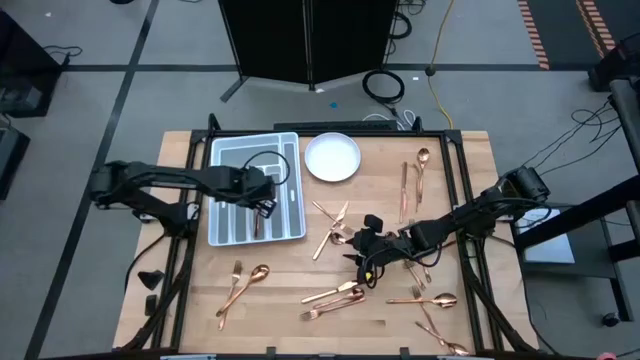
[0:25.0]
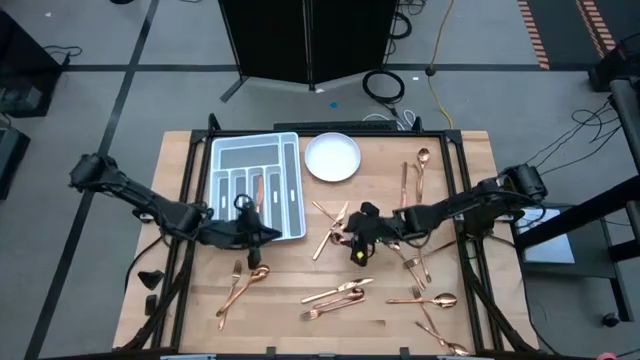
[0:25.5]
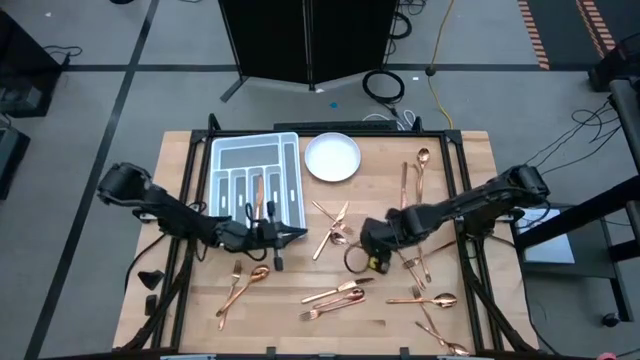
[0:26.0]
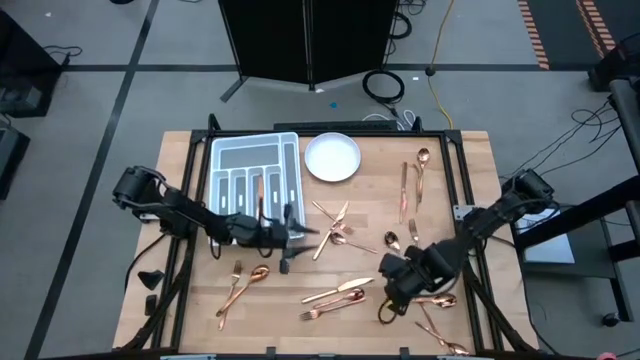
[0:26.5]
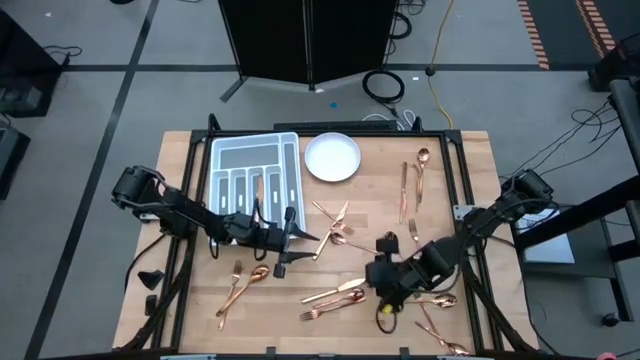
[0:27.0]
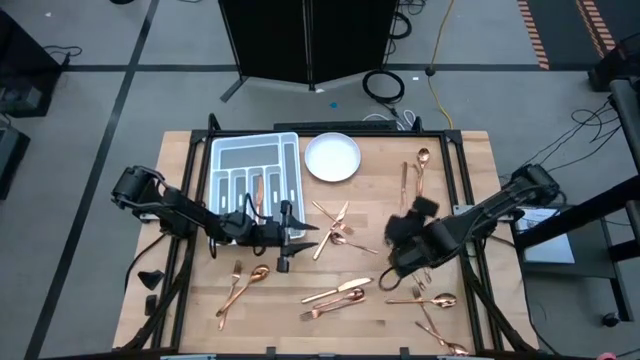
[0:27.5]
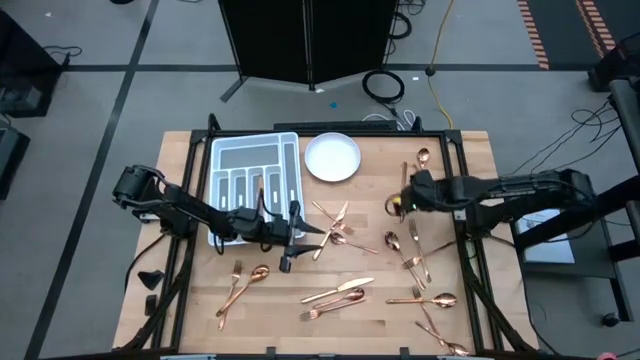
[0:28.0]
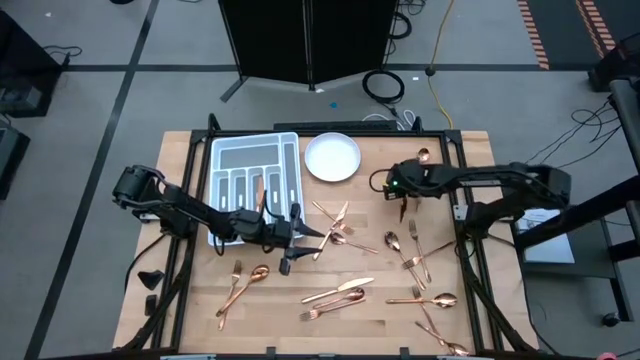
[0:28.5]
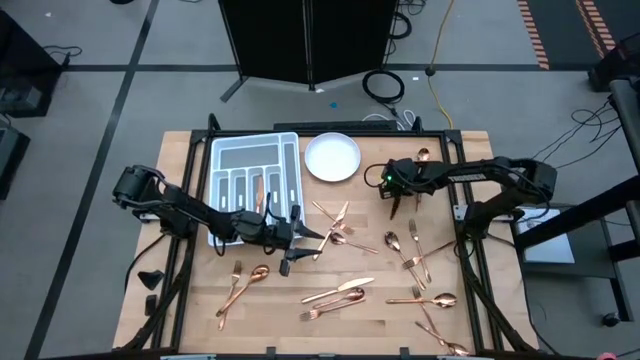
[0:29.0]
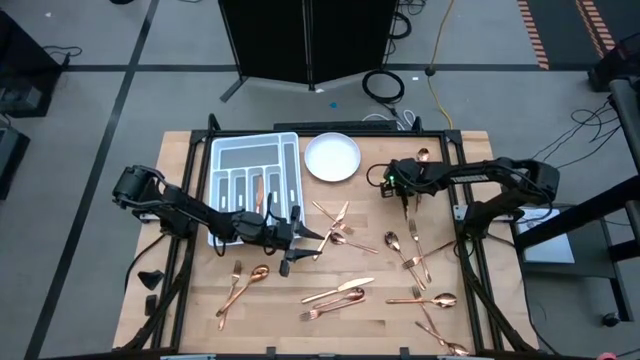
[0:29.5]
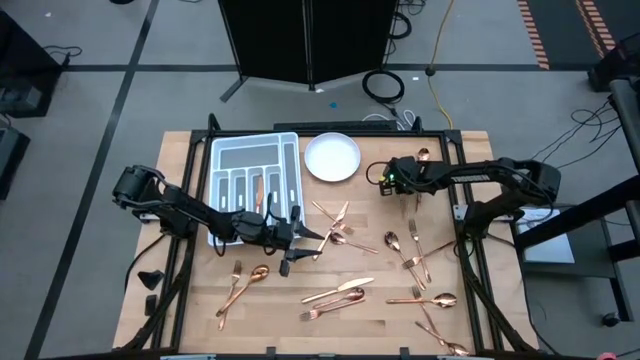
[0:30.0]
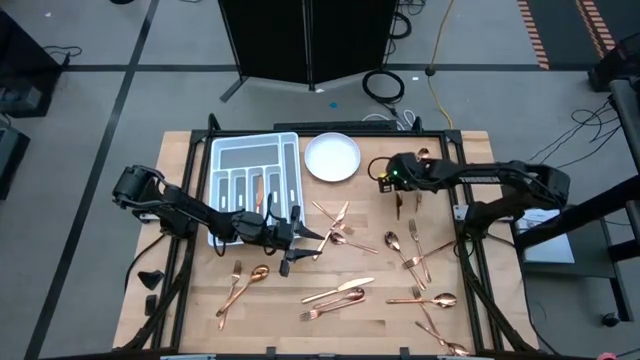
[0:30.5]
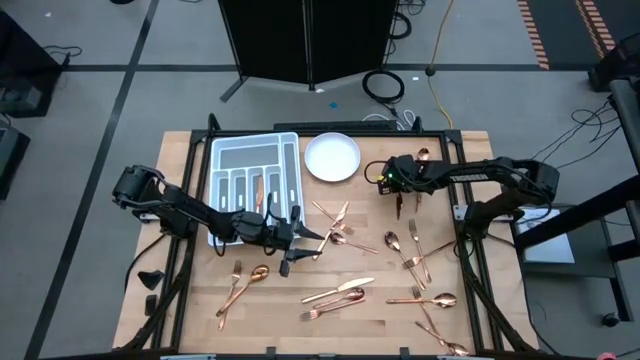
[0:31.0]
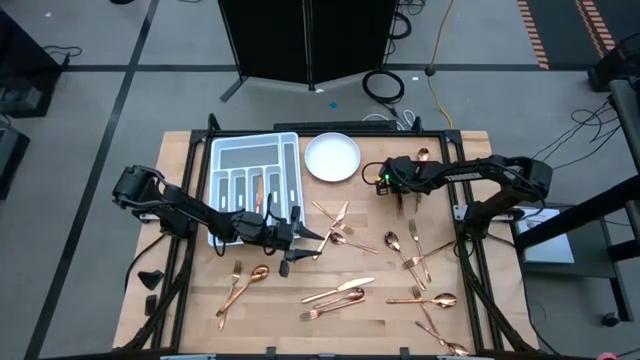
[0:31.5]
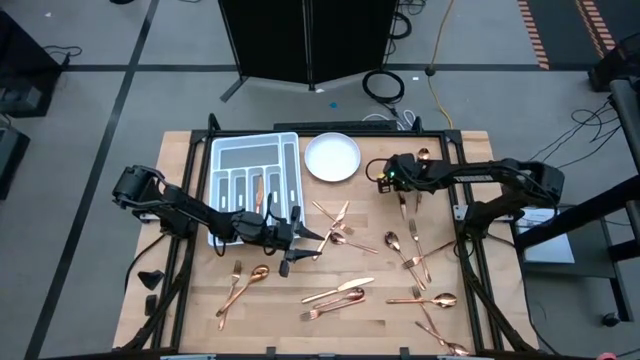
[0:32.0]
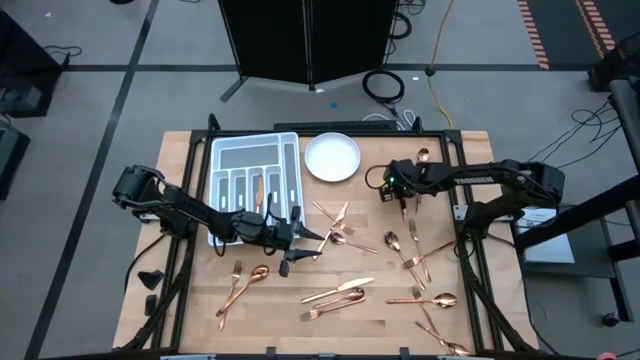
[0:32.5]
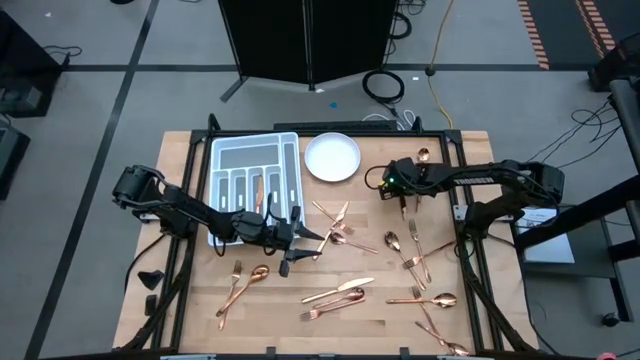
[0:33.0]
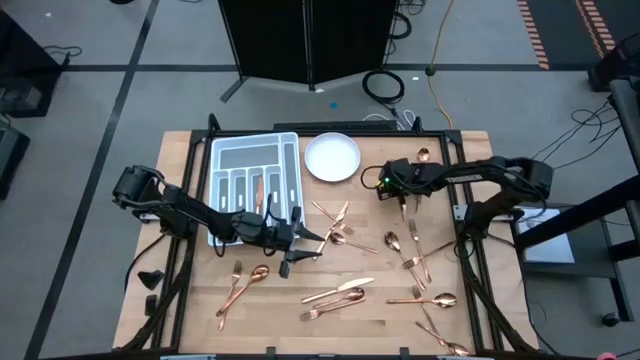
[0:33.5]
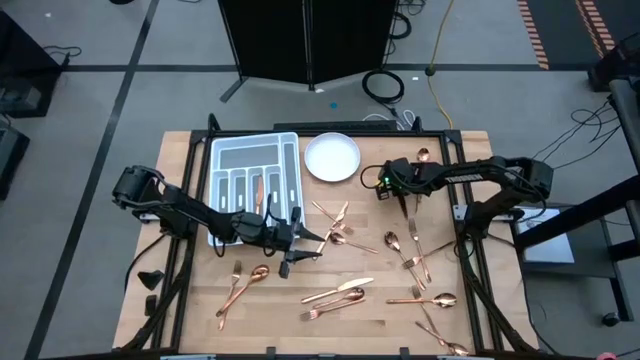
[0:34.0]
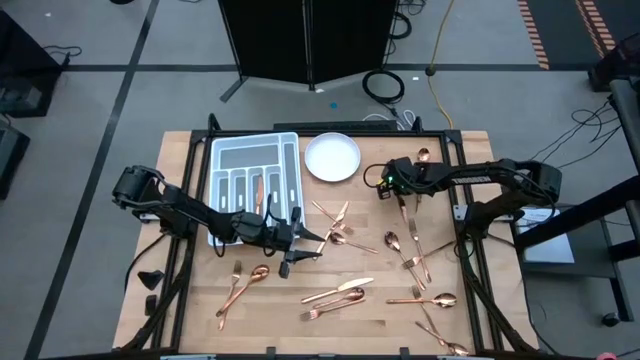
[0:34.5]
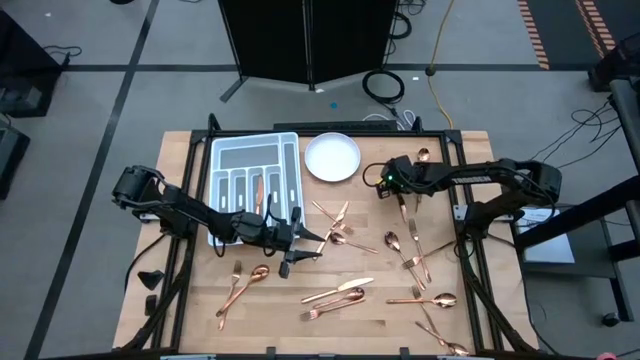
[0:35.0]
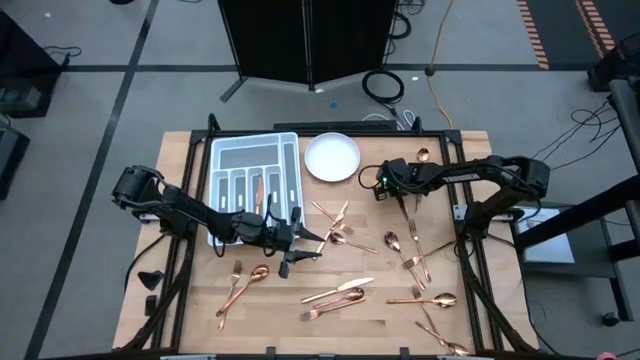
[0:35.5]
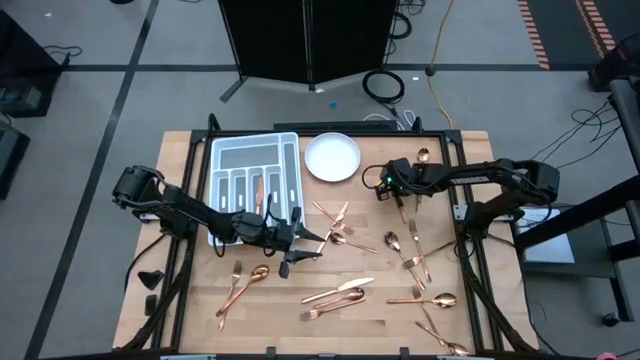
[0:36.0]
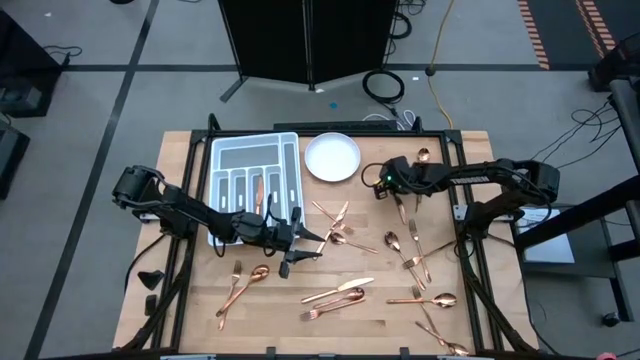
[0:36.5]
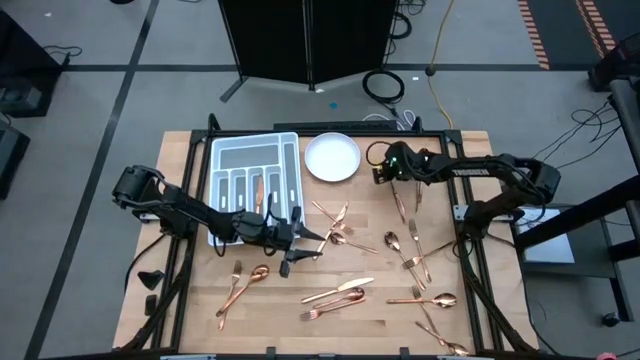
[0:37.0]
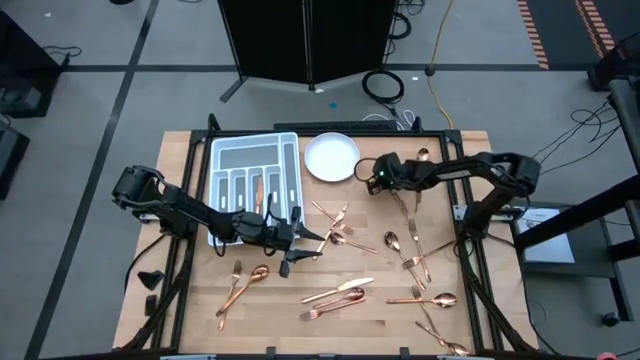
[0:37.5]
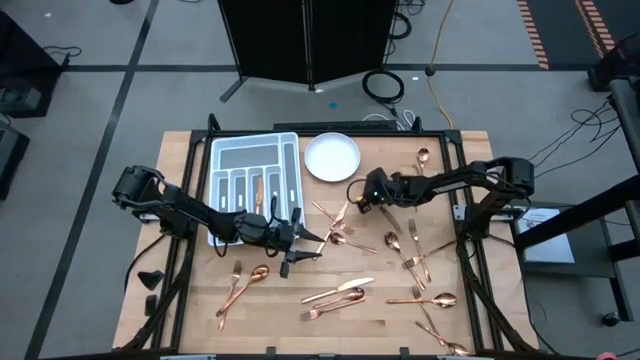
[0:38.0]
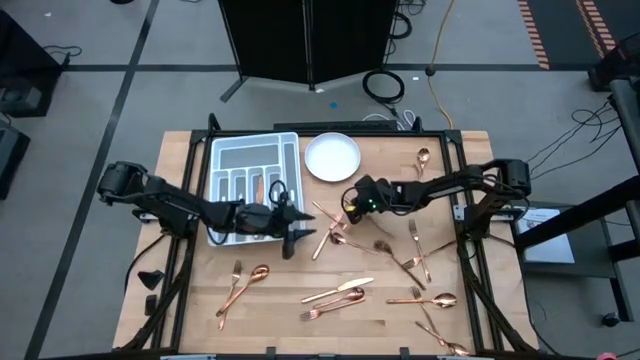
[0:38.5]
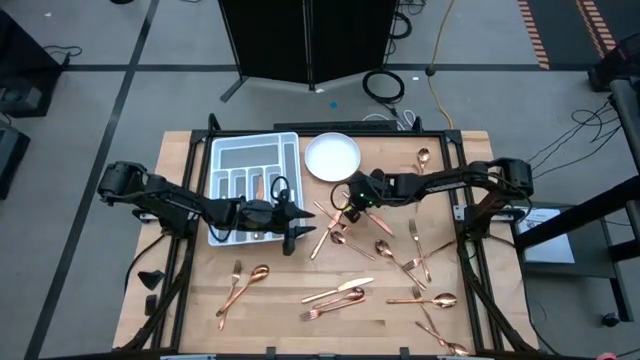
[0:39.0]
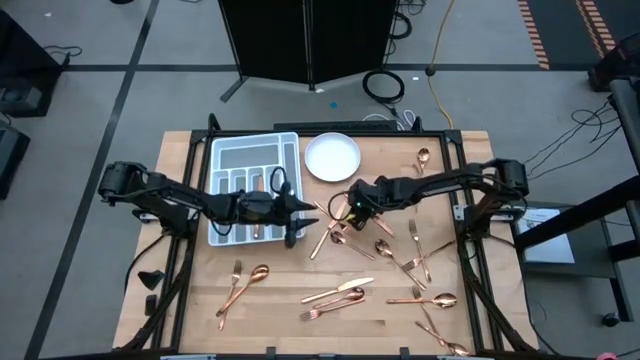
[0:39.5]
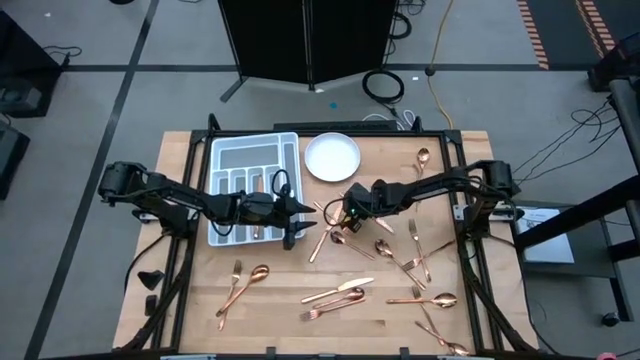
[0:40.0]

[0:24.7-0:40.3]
Task: Sort silverware
Put the knife on the silverware tray
